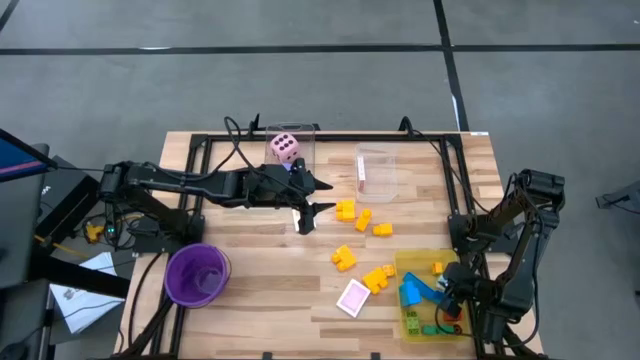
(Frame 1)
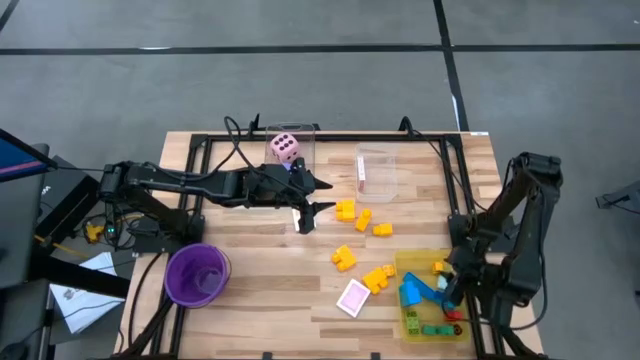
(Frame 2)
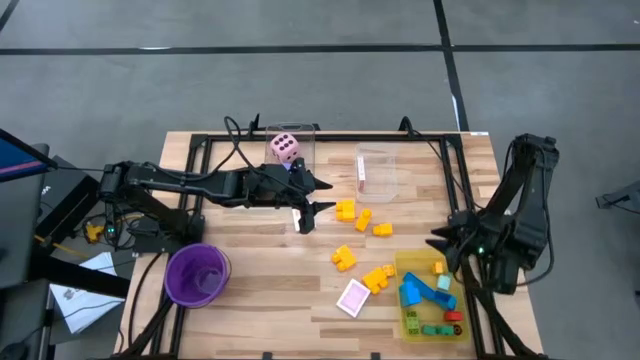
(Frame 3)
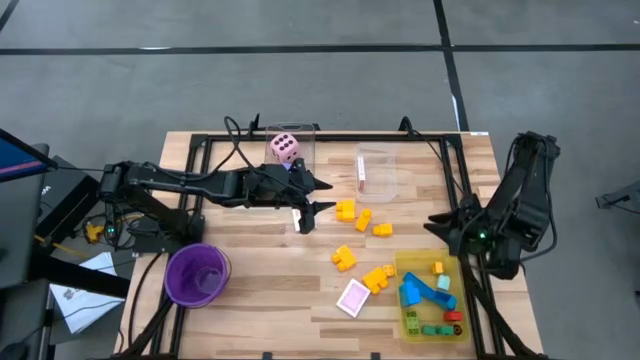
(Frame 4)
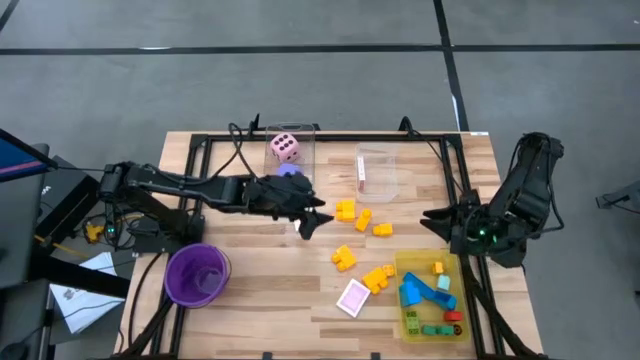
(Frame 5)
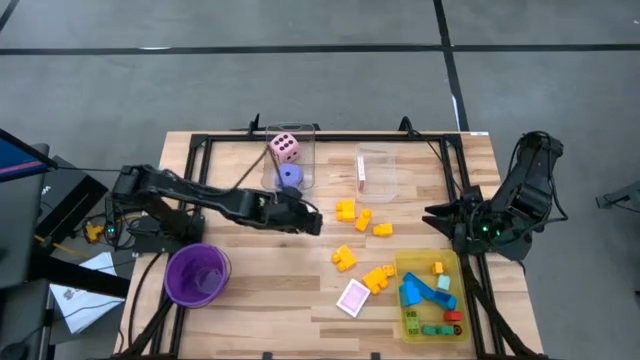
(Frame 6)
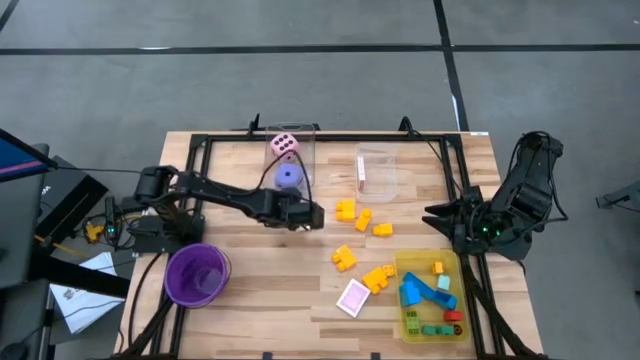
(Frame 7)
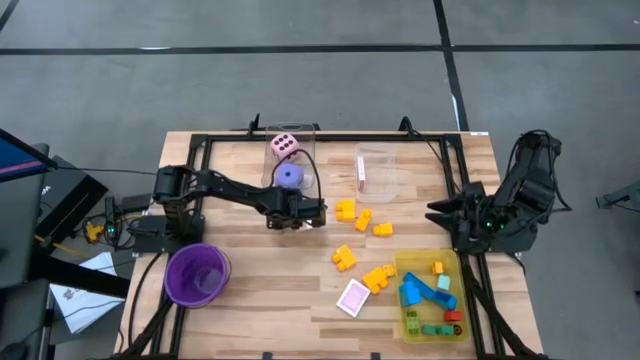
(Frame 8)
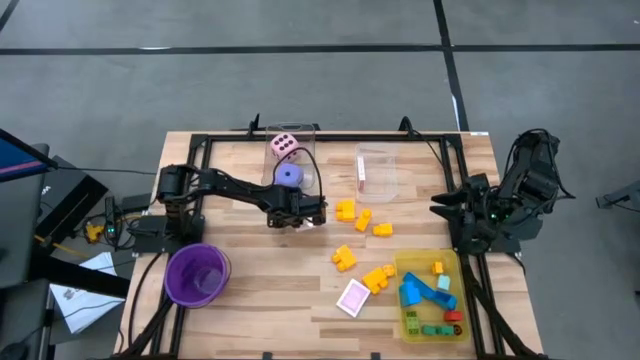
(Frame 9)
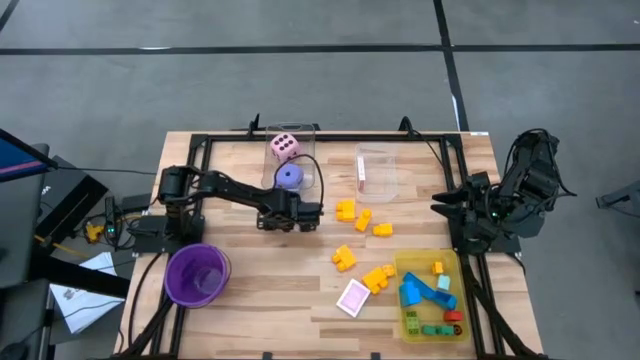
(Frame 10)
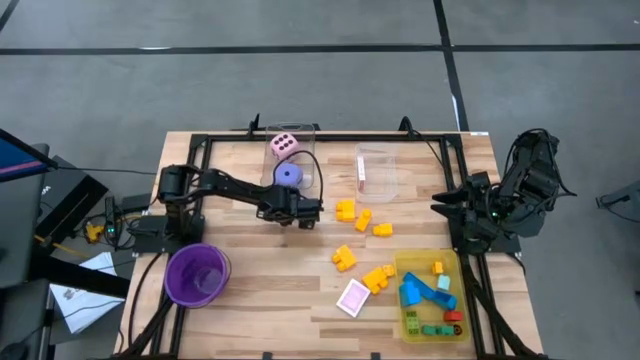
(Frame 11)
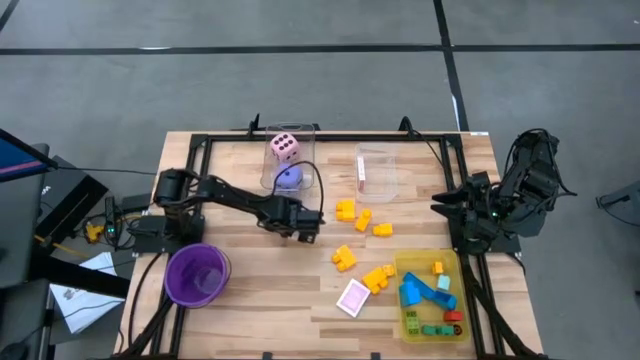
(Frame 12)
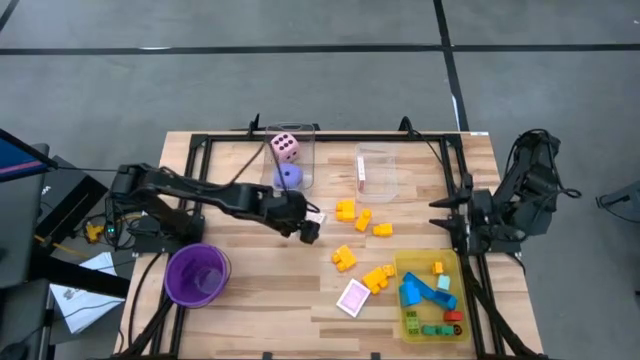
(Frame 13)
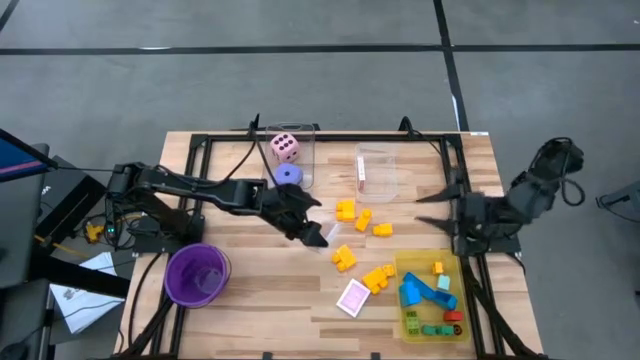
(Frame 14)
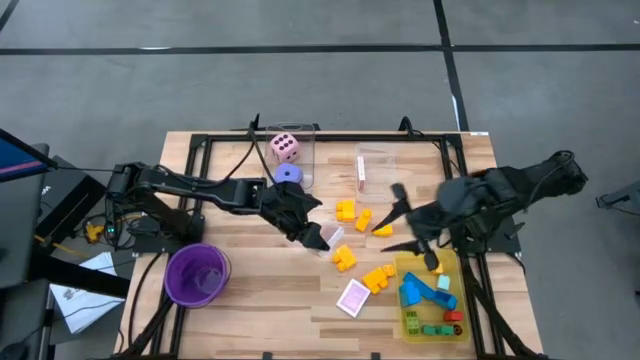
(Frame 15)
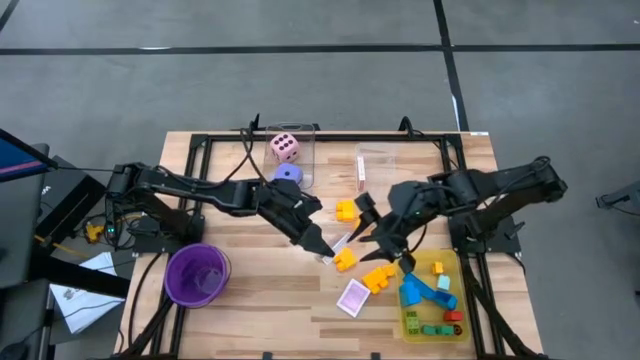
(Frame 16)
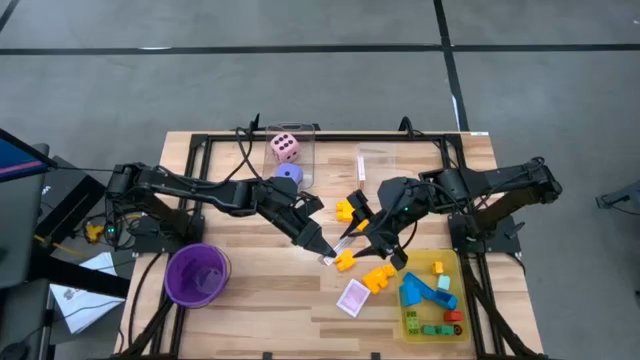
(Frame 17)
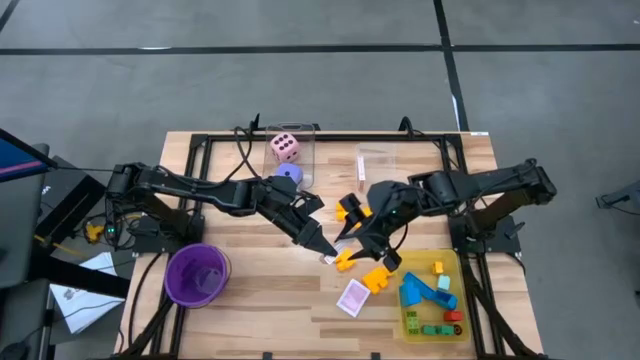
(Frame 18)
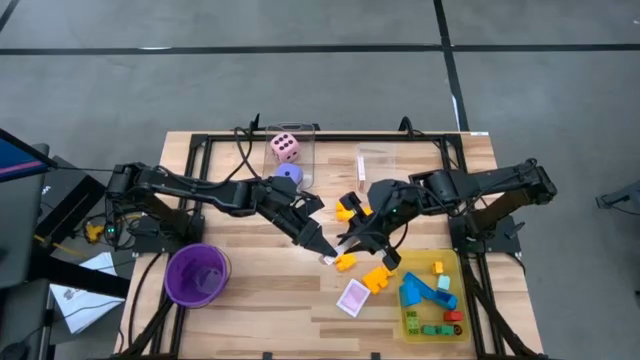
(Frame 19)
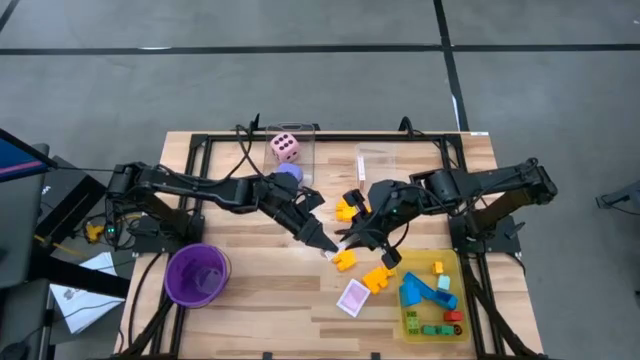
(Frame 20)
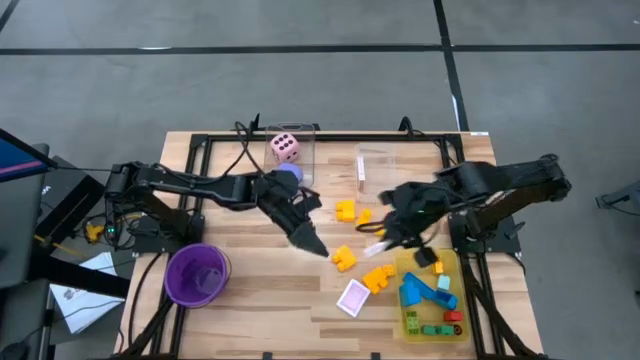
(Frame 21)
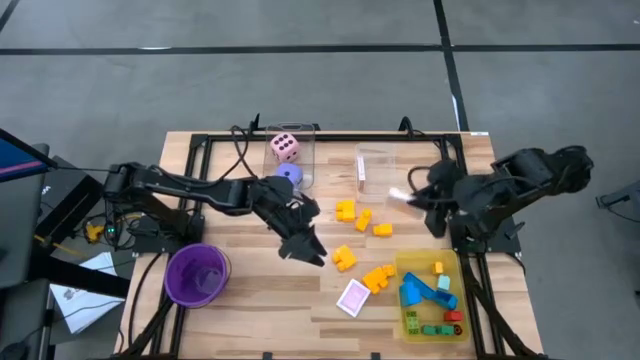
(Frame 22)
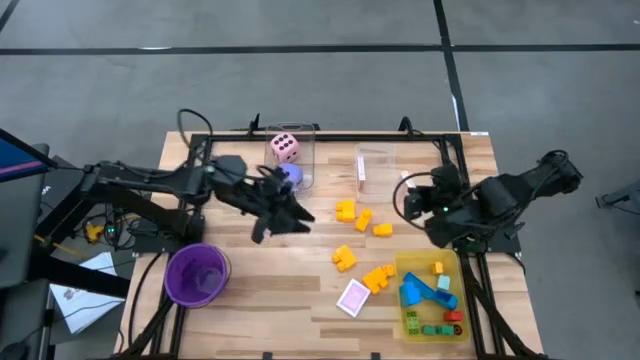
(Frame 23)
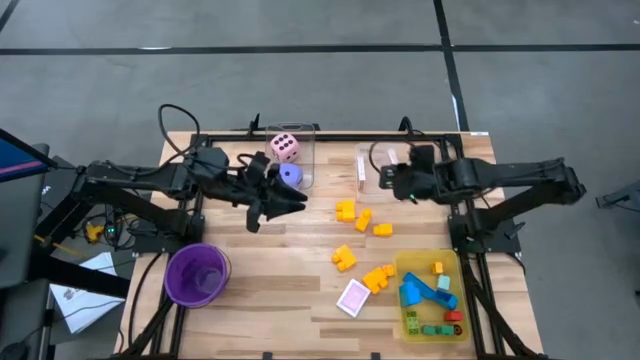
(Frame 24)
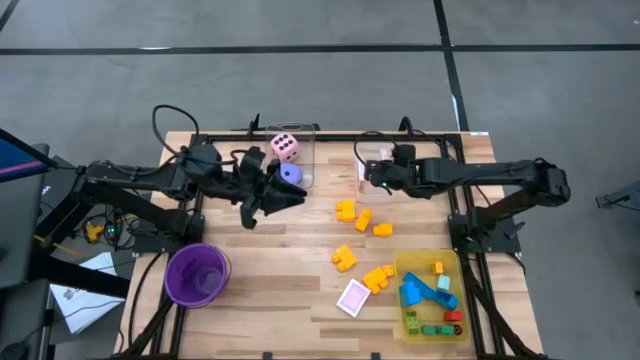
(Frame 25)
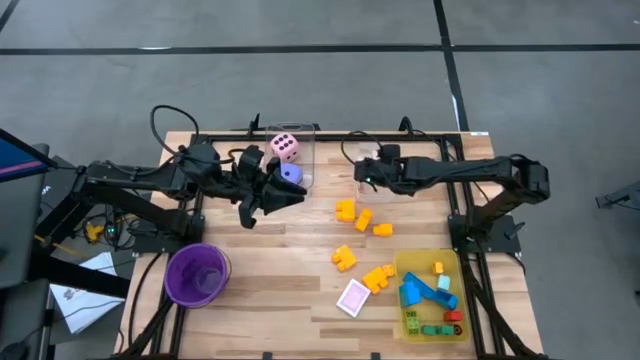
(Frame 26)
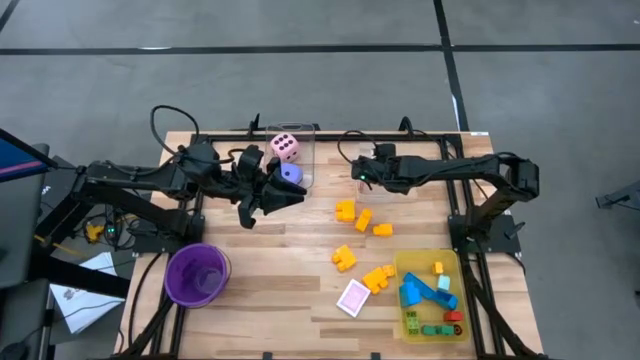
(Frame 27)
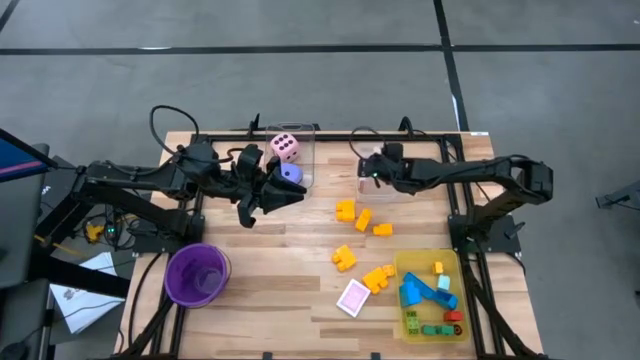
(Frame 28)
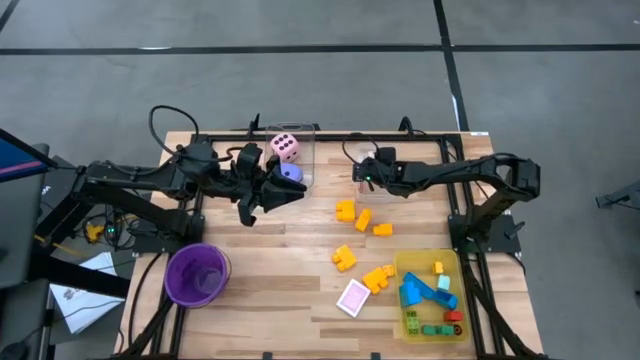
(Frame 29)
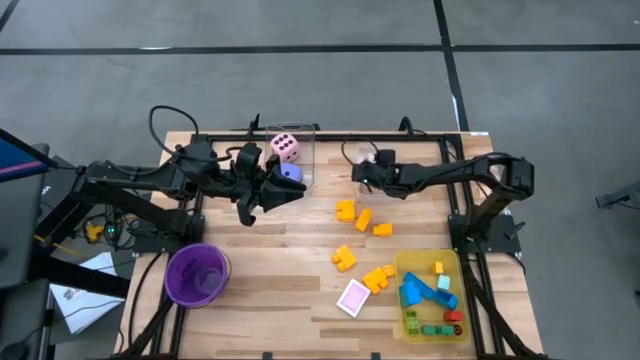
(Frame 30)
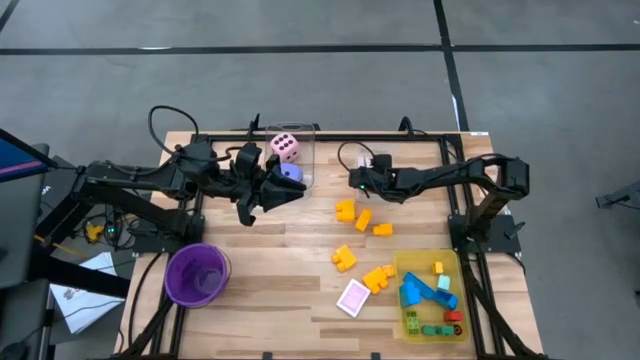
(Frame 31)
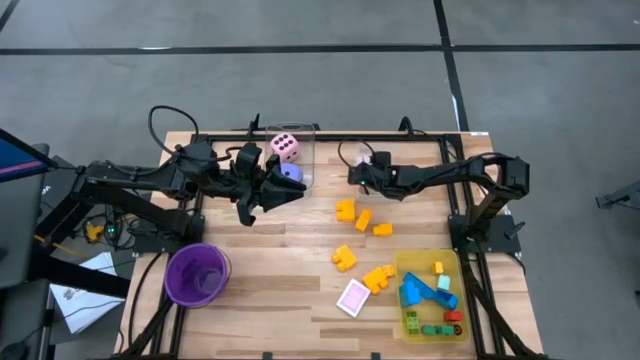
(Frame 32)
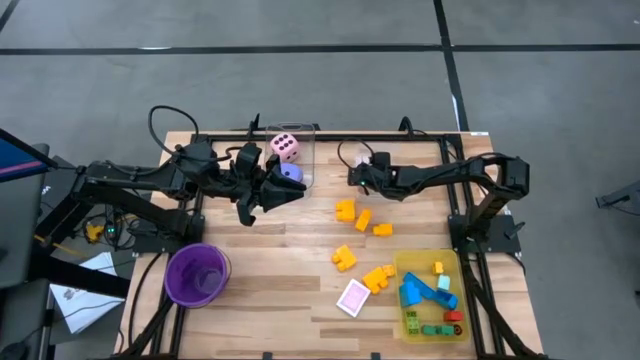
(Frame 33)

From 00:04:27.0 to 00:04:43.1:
Task: Pick & Place Toys
Put the orange deck of cards into the right transparent bin

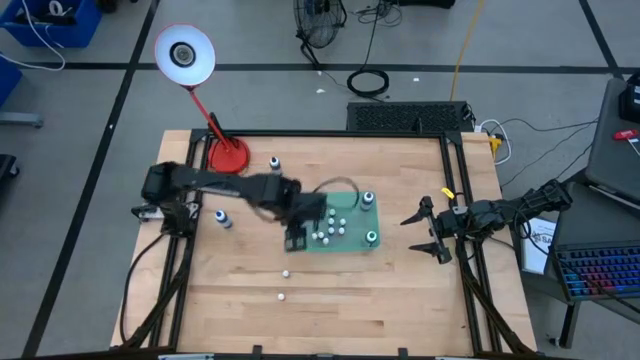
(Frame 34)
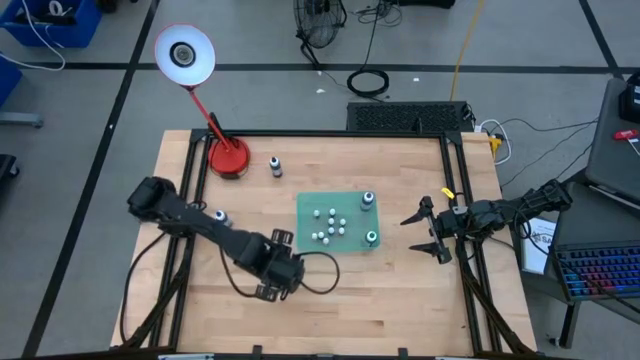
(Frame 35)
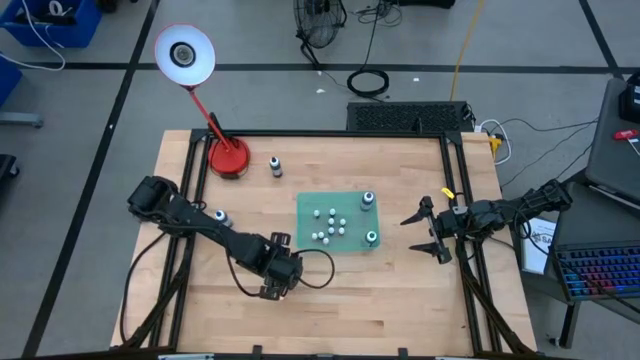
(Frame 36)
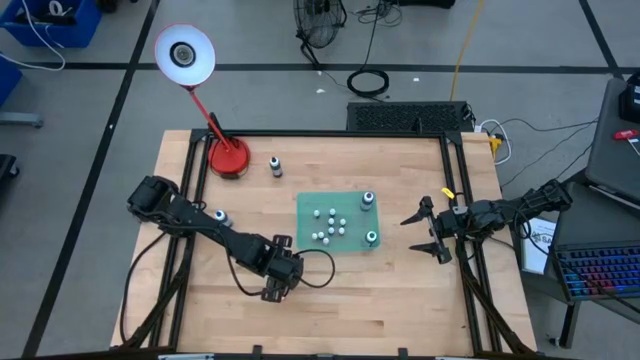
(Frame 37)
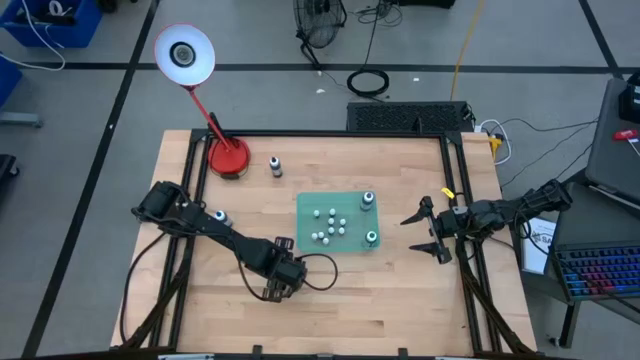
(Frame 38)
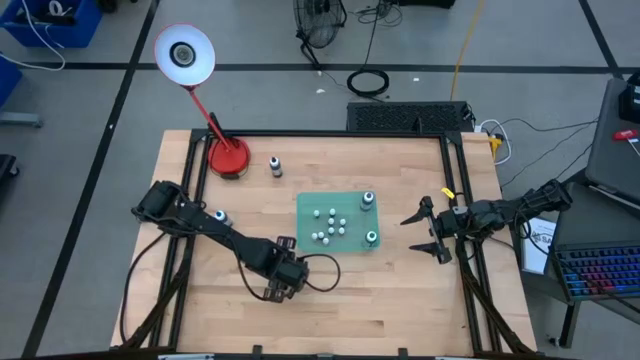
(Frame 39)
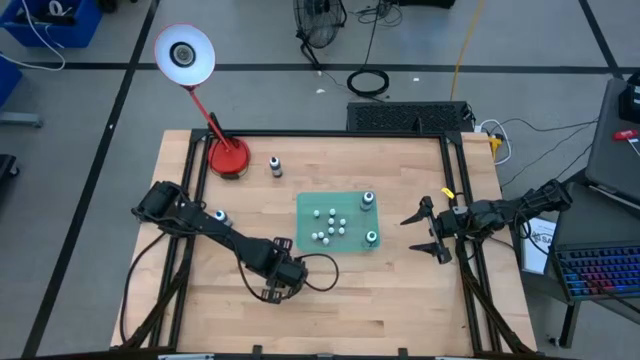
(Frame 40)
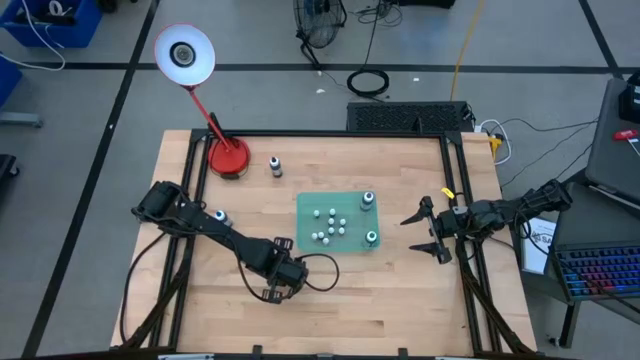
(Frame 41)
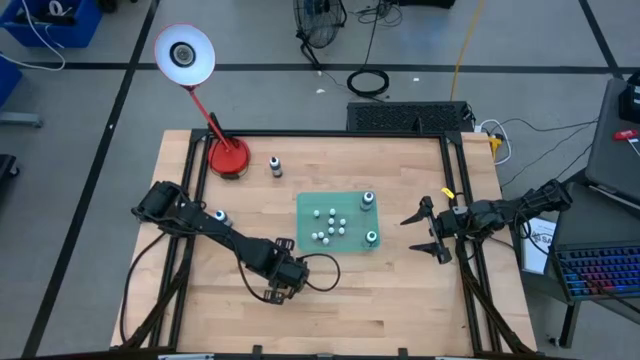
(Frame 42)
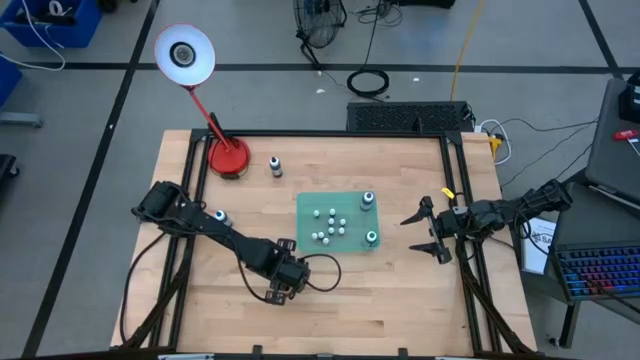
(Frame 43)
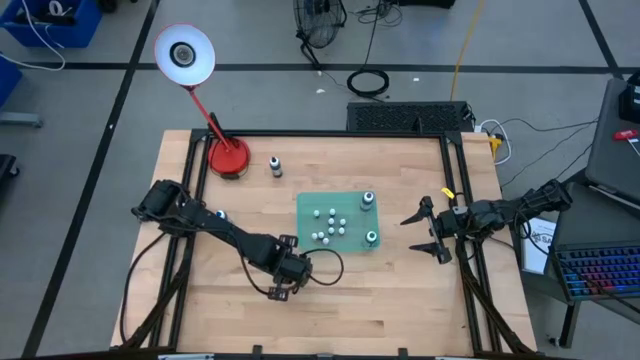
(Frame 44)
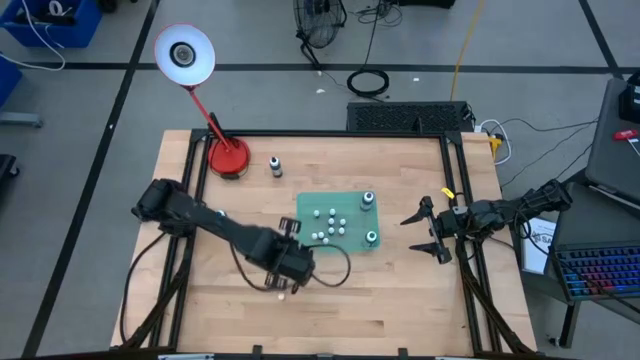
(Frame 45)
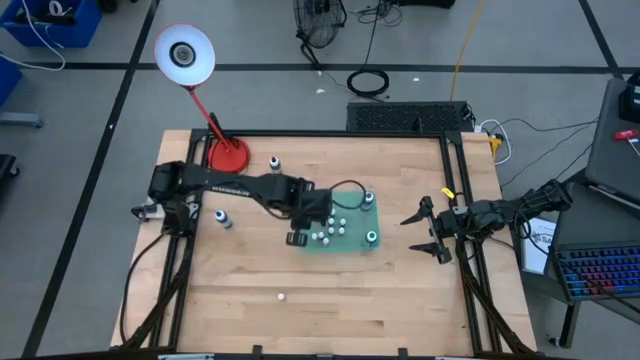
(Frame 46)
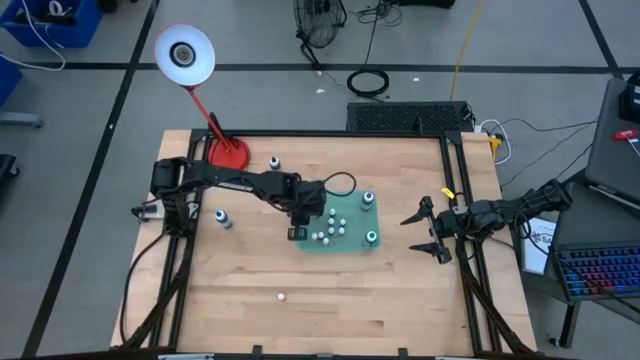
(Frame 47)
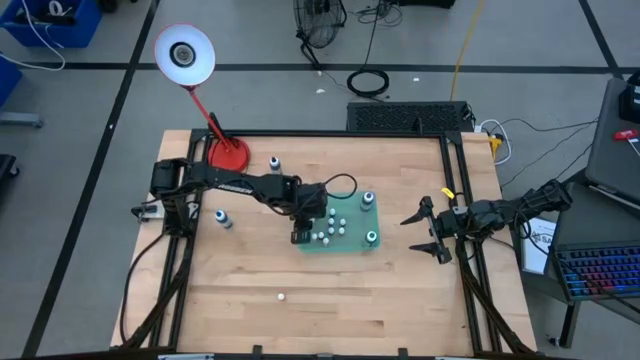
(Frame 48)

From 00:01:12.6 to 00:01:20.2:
Task: Pick & Place food coloring
Put the small red food coloring bottle into the blue bin
